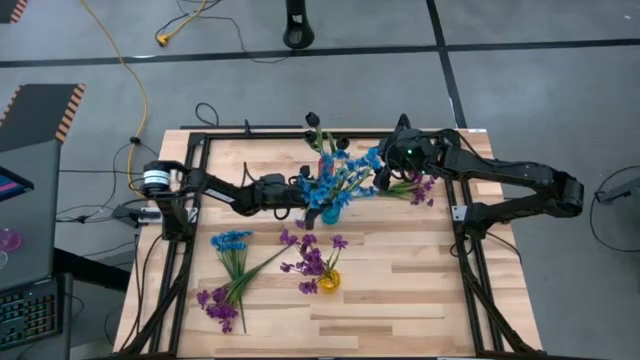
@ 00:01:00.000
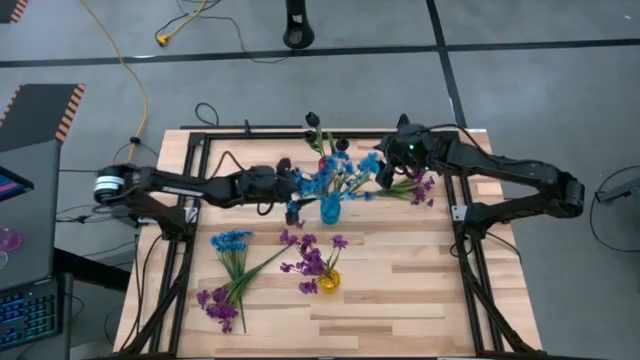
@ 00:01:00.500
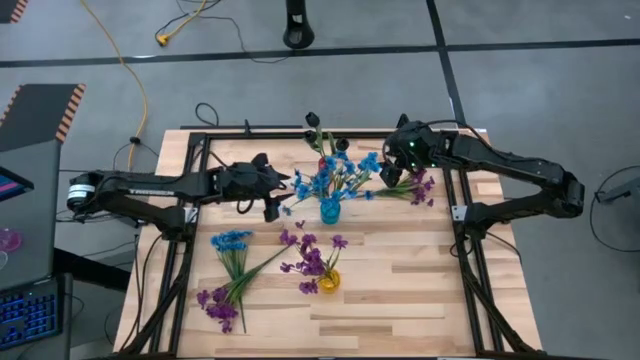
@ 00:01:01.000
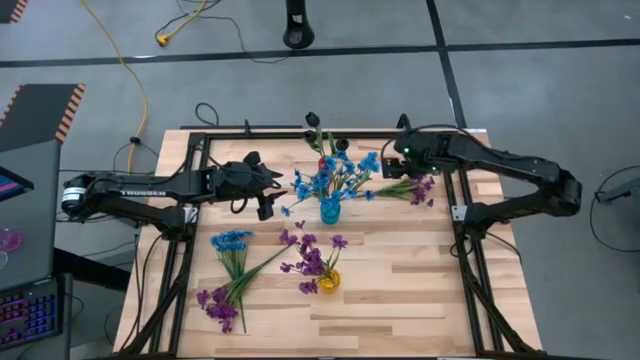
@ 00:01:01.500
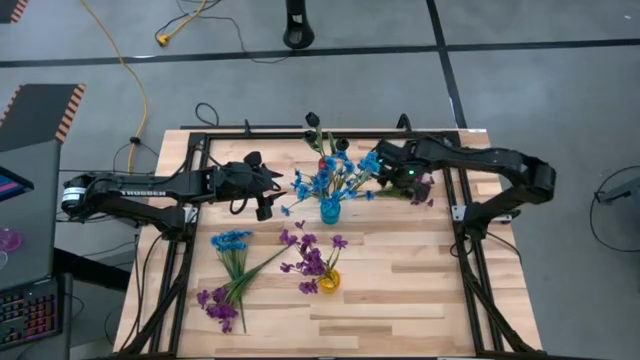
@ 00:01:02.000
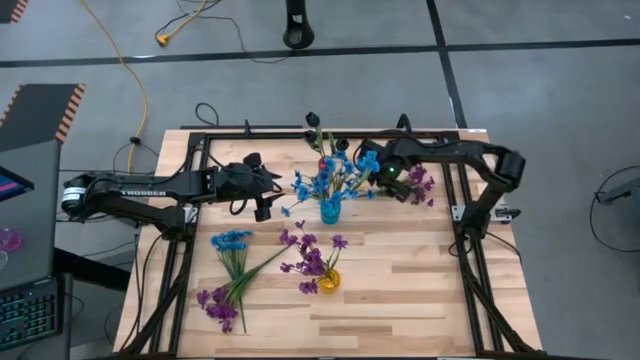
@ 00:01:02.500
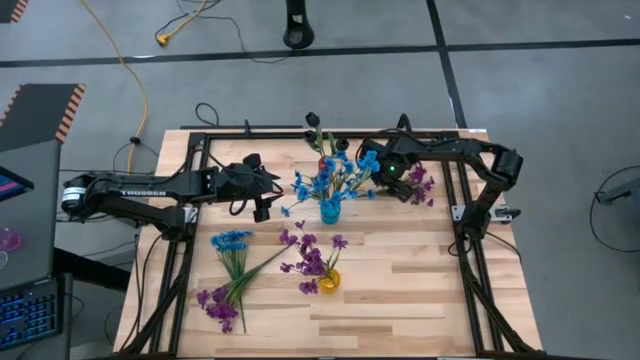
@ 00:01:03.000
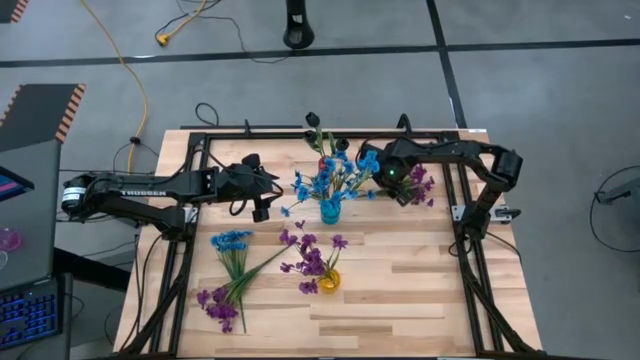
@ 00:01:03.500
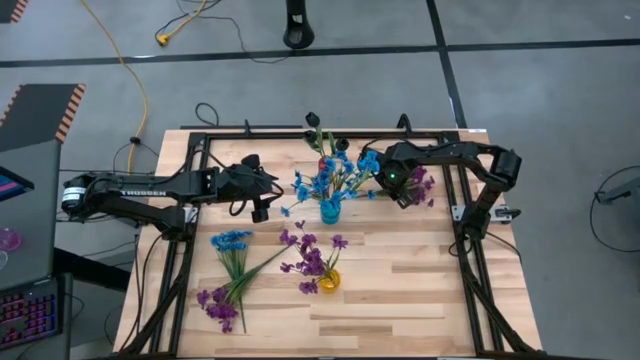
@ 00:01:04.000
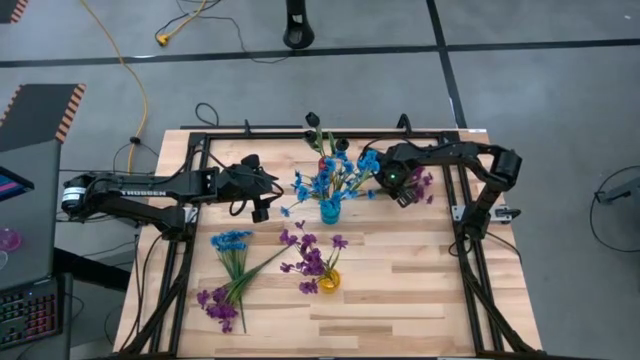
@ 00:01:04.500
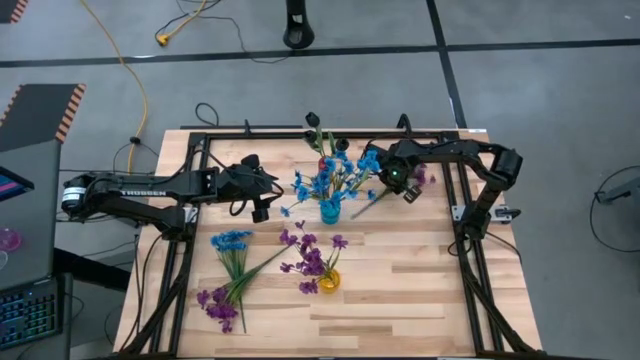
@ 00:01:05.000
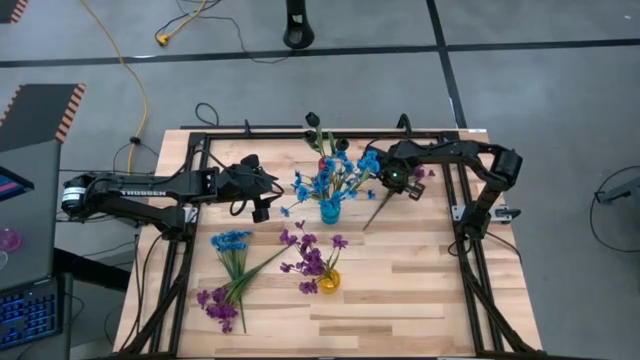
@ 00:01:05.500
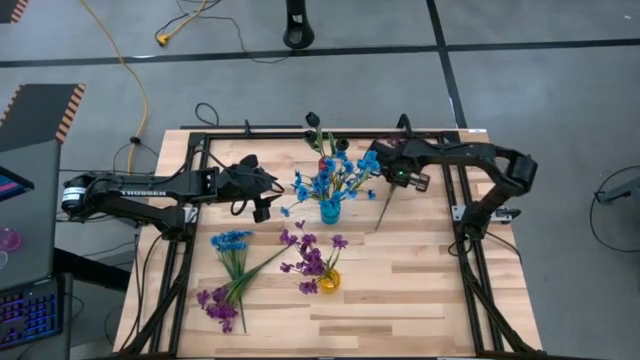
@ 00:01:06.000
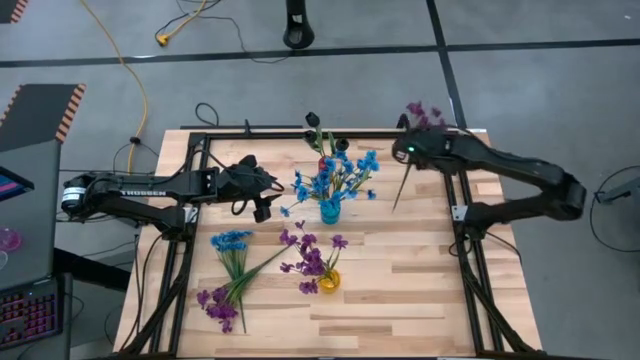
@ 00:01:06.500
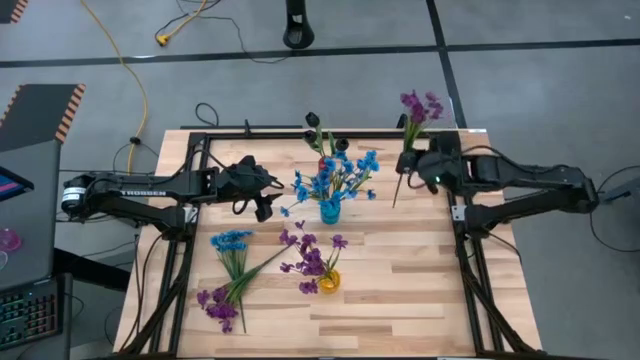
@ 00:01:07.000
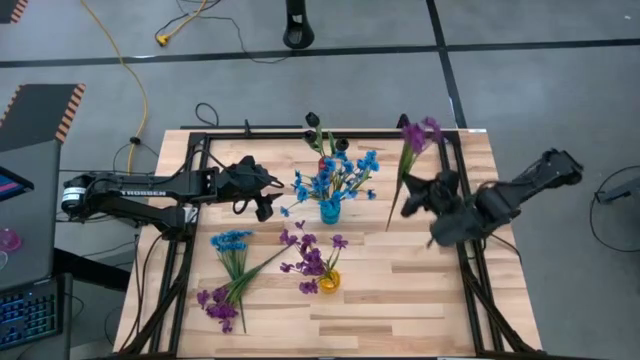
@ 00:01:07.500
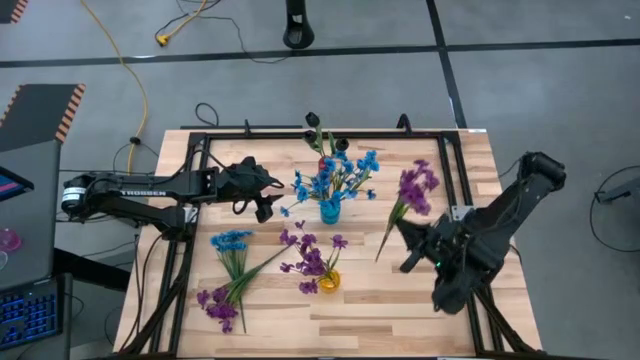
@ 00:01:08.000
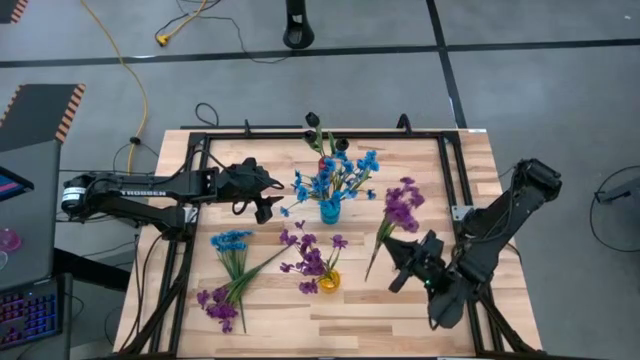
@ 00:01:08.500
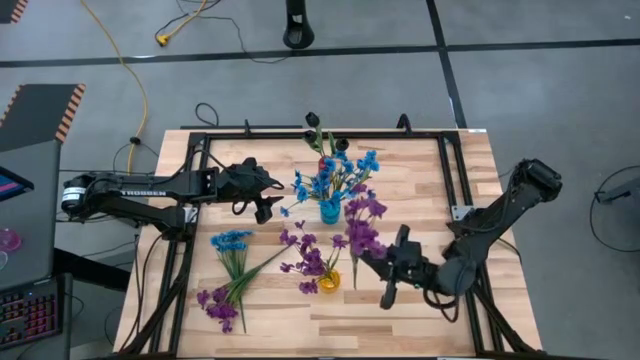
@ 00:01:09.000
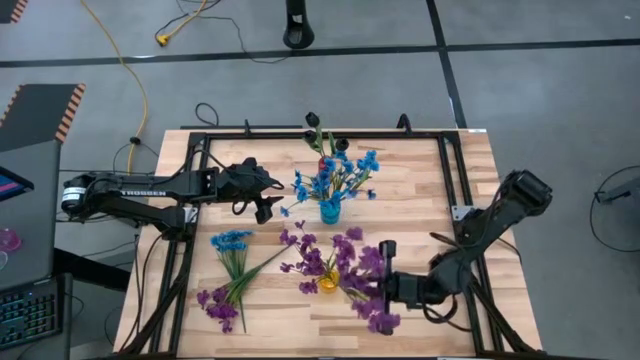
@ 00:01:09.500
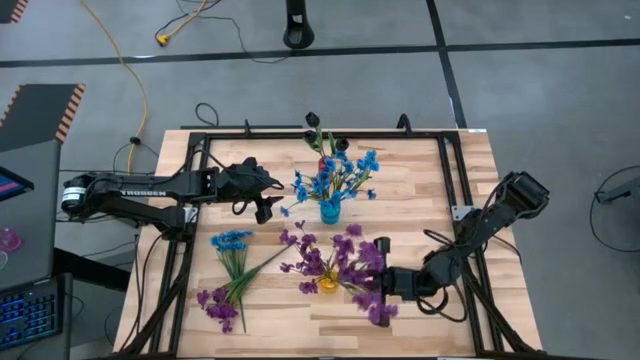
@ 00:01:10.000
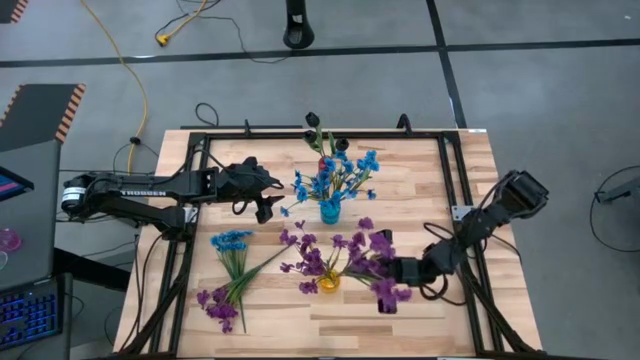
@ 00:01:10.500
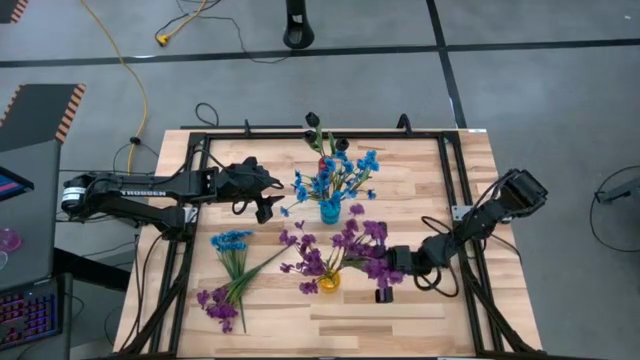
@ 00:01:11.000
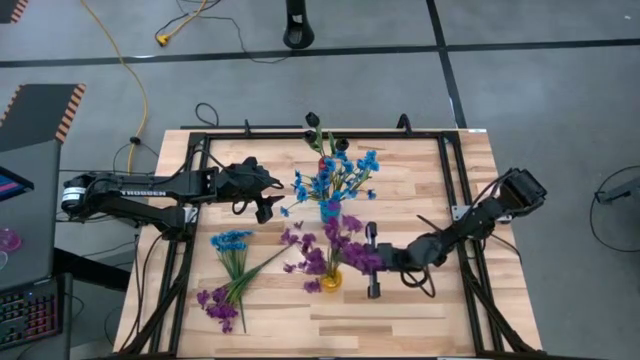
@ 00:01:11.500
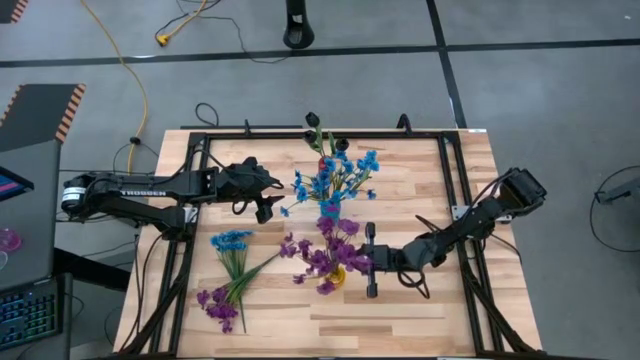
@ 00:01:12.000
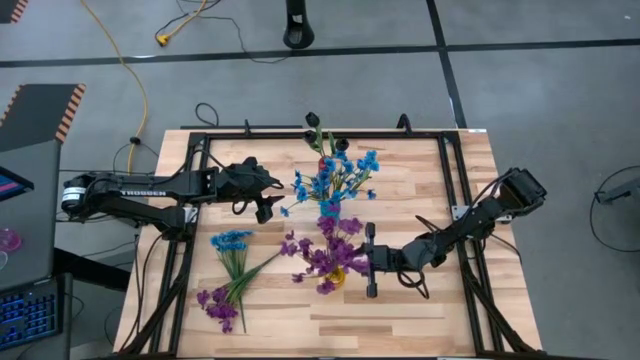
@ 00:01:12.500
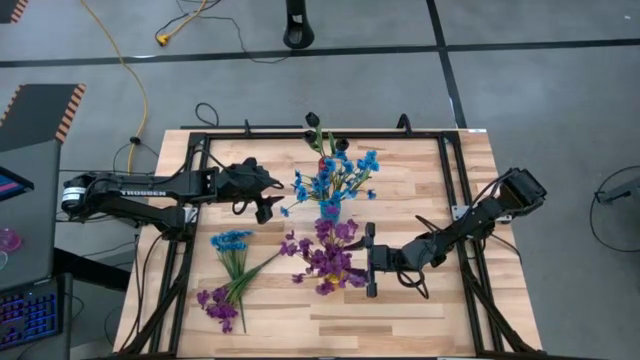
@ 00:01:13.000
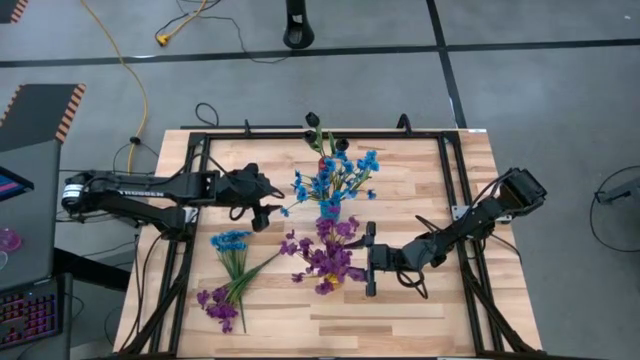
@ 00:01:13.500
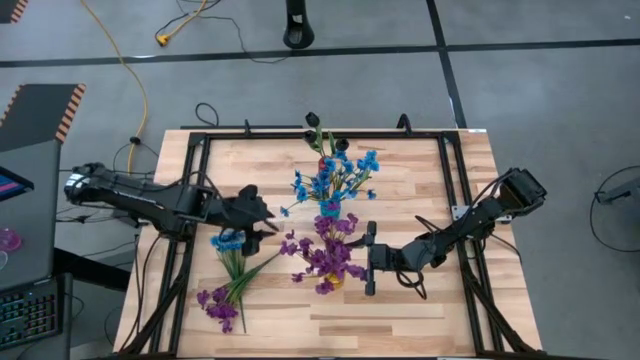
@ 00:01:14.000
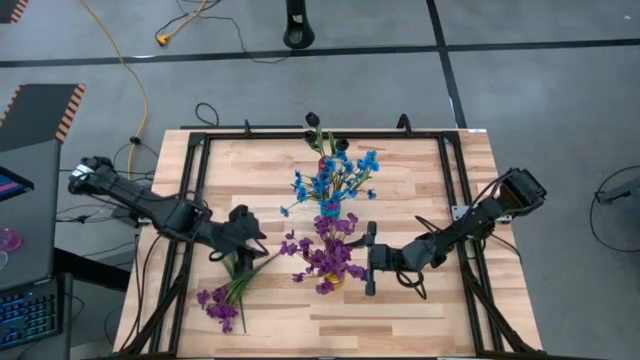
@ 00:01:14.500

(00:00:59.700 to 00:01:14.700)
Task: Sort flowers into vase by color
Put the top violet flower into the yellow crystal vase

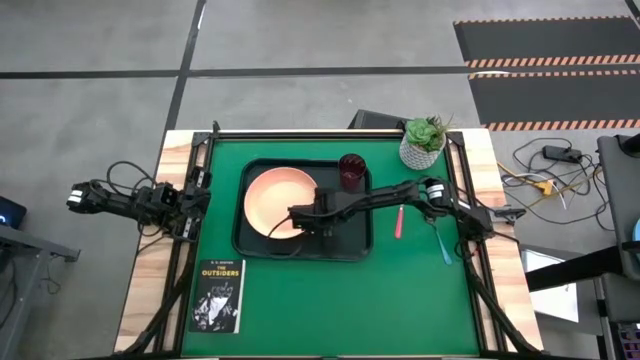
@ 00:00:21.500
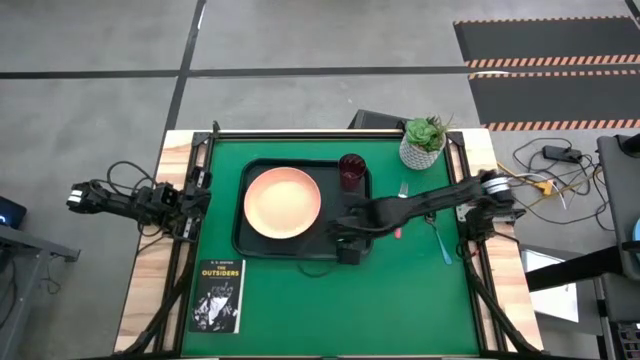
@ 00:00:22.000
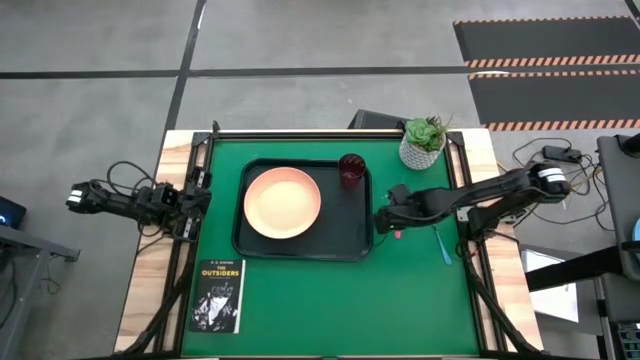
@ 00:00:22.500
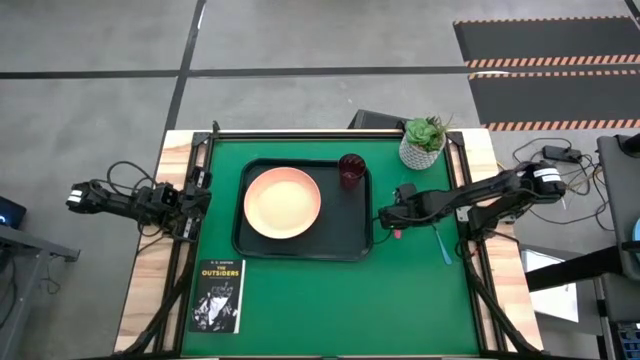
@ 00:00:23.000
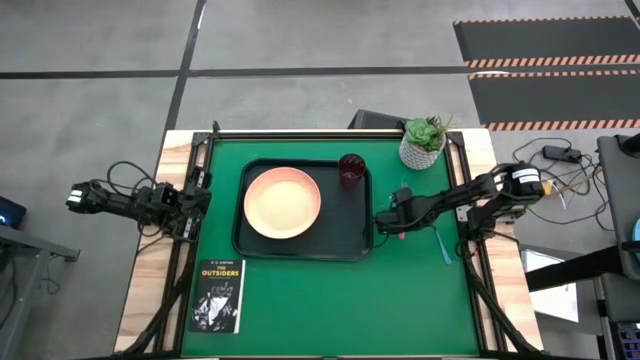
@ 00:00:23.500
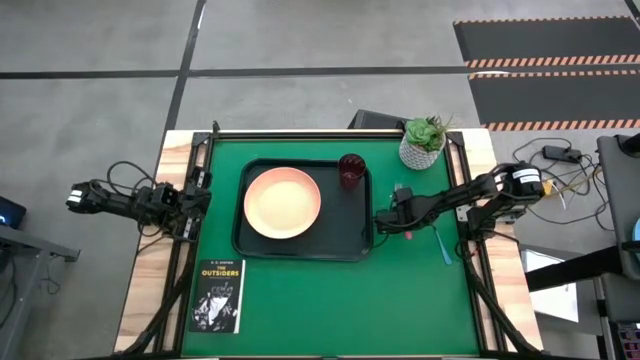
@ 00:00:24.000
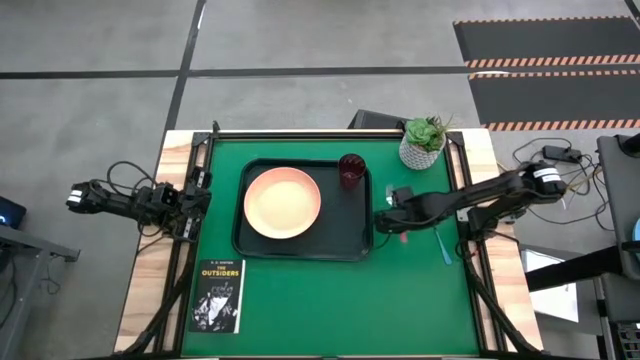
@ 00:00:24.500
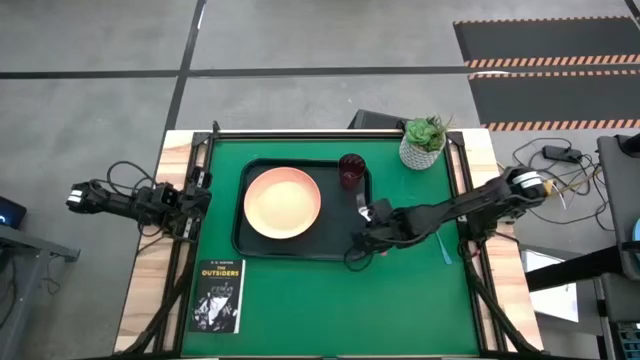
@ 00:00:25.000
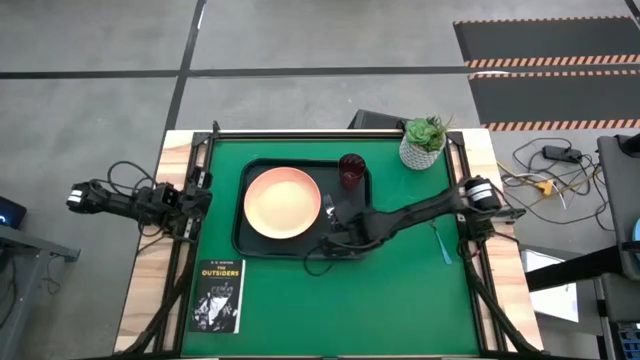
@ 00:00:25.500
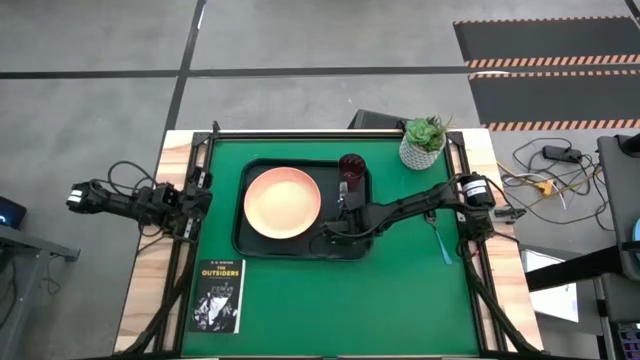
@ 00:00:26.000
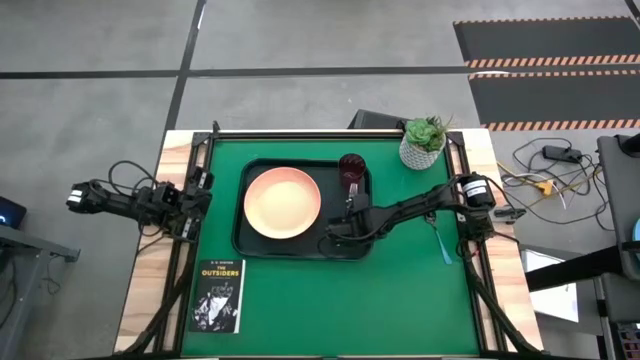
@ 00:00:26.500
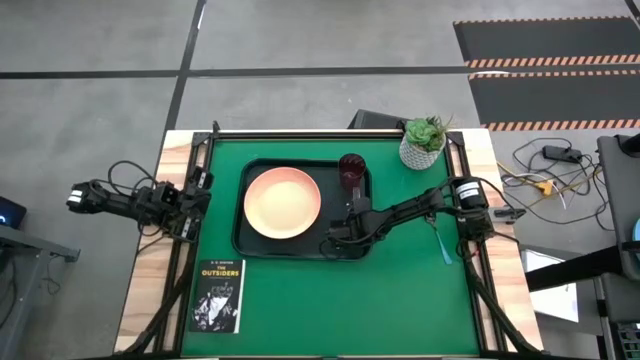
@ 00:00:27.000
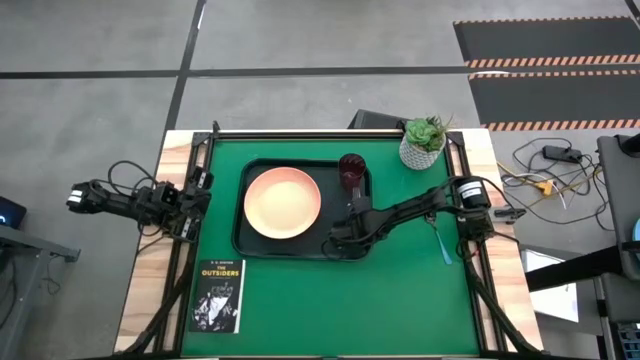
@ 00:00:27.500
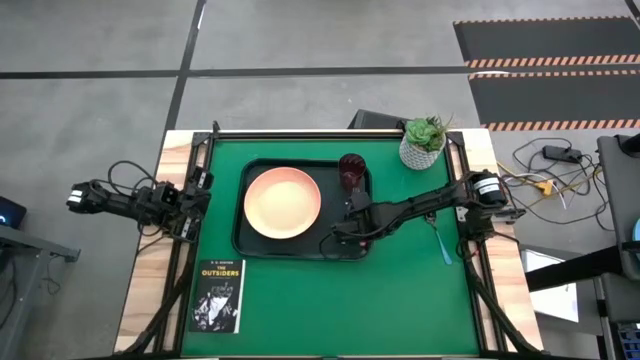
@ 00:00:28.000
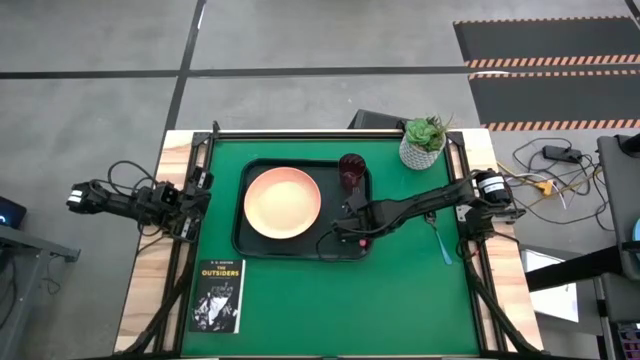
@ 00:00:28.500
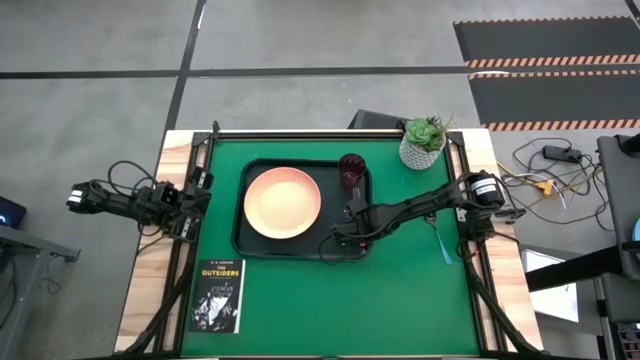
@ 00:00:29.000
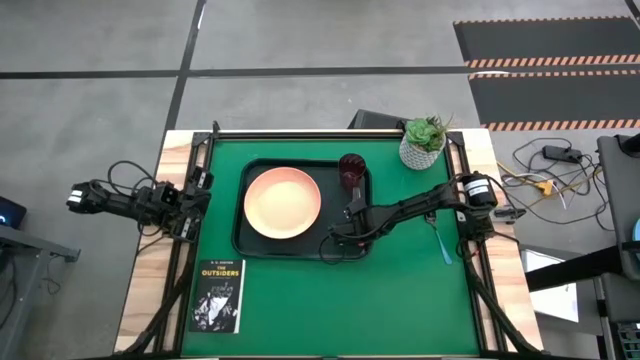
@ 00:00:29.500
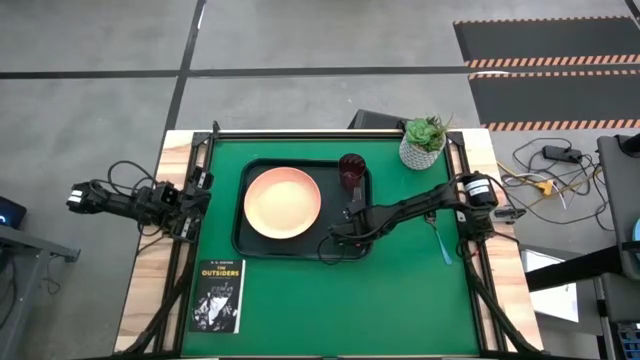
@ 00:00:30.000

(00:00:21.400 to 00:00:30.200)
Task: Pick and place plate/cup/fork/spoon on tray
Put the red fork on the right of the black tray
